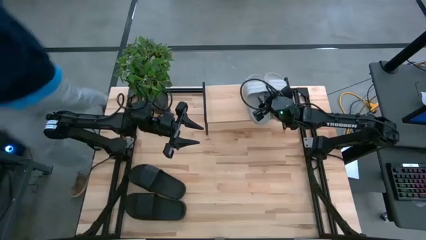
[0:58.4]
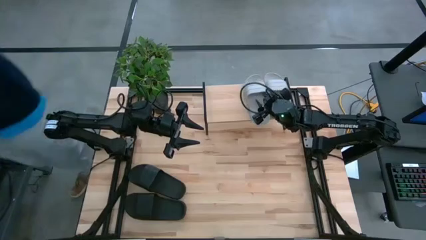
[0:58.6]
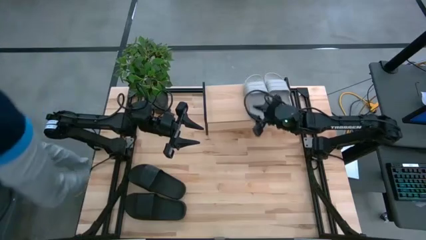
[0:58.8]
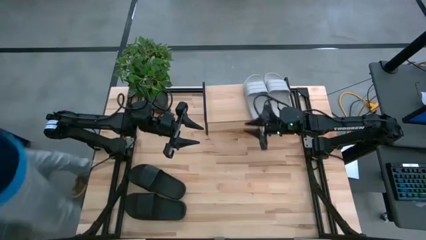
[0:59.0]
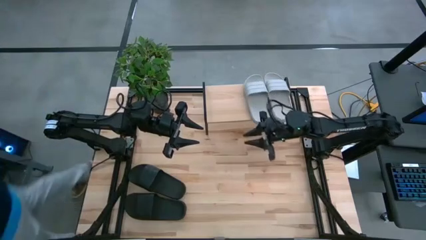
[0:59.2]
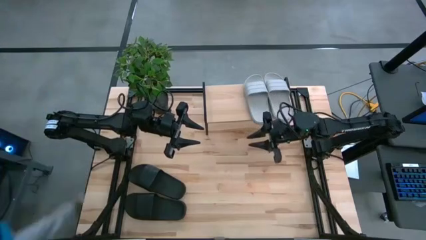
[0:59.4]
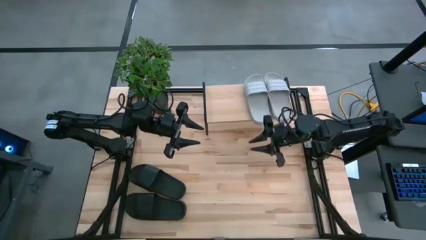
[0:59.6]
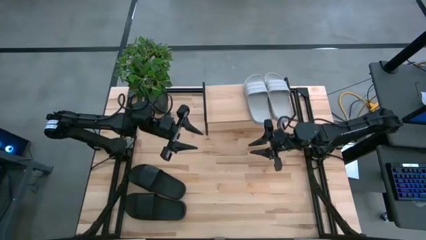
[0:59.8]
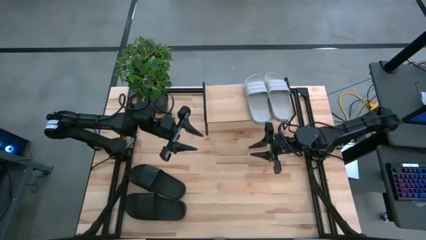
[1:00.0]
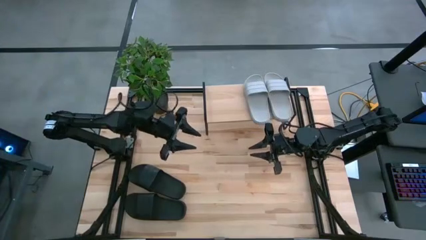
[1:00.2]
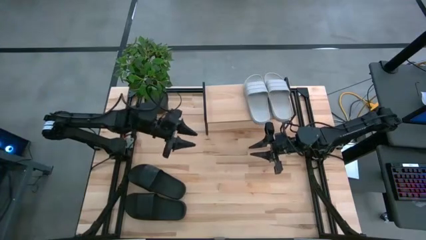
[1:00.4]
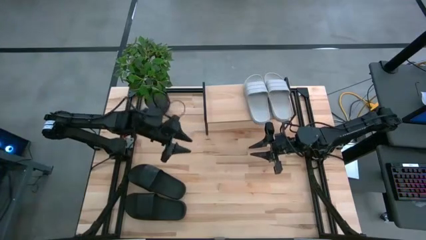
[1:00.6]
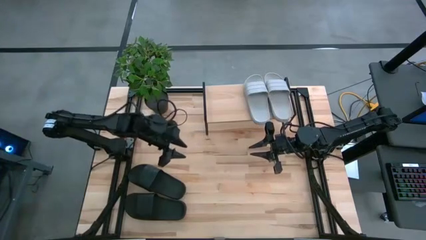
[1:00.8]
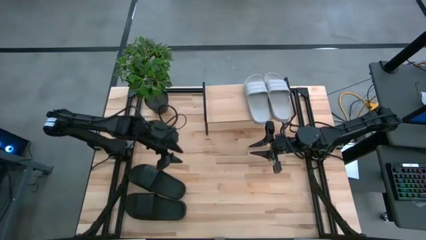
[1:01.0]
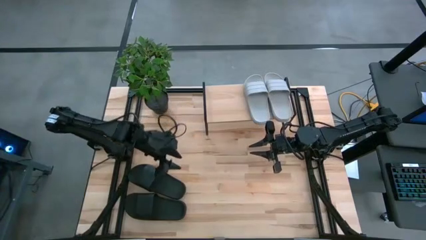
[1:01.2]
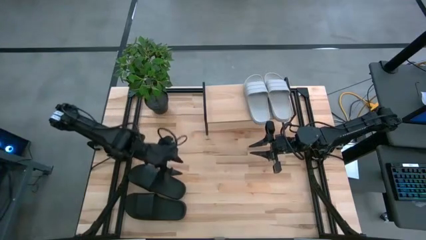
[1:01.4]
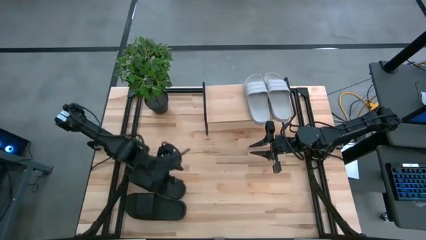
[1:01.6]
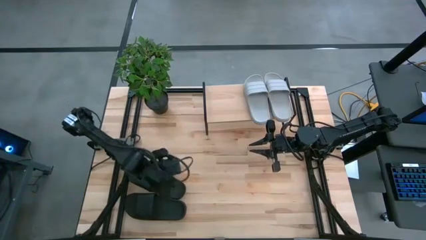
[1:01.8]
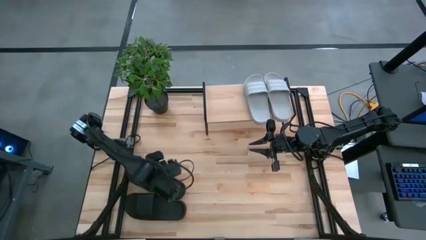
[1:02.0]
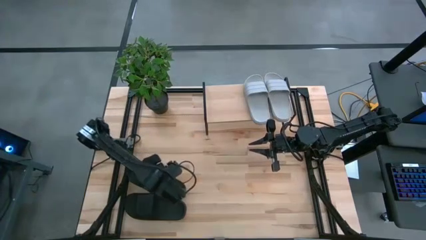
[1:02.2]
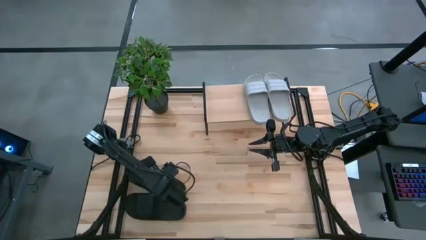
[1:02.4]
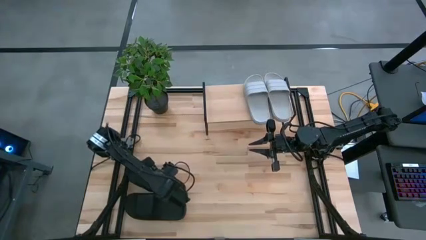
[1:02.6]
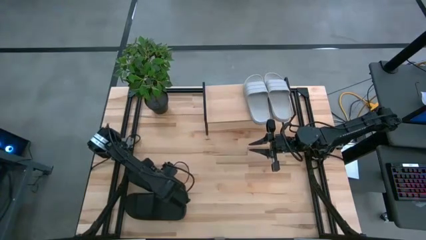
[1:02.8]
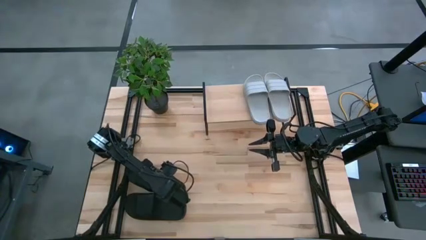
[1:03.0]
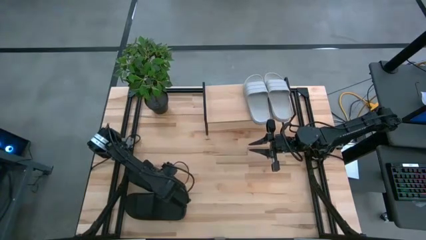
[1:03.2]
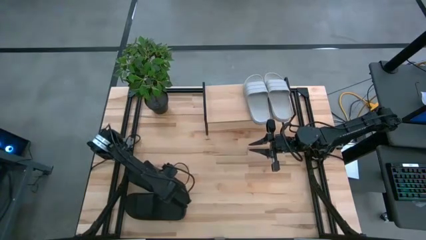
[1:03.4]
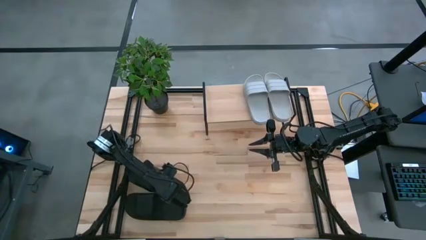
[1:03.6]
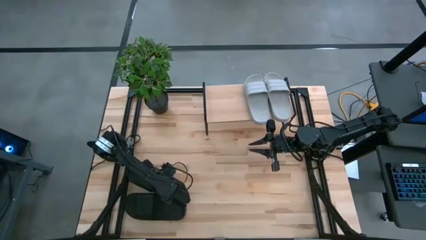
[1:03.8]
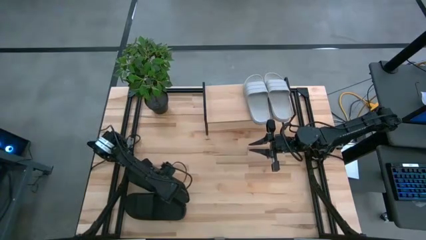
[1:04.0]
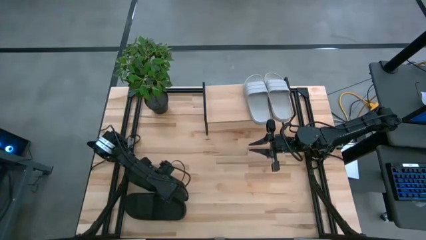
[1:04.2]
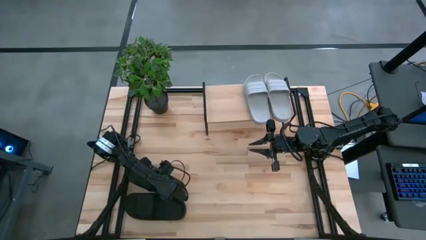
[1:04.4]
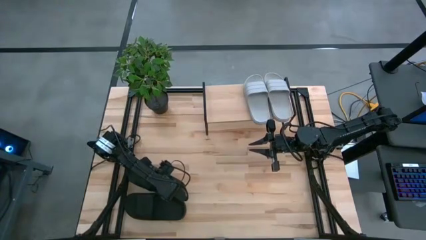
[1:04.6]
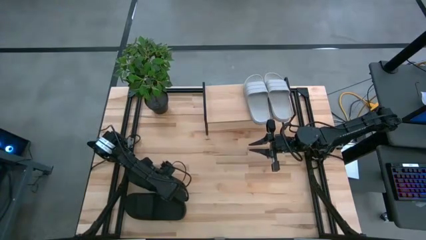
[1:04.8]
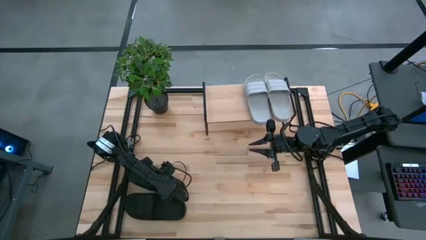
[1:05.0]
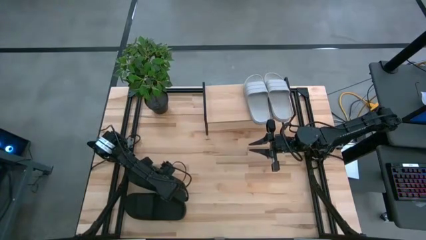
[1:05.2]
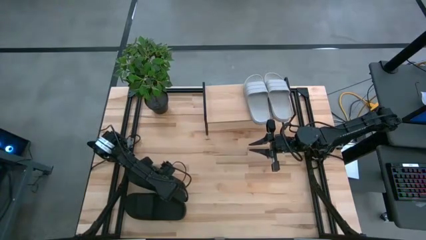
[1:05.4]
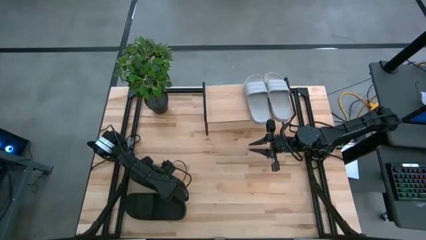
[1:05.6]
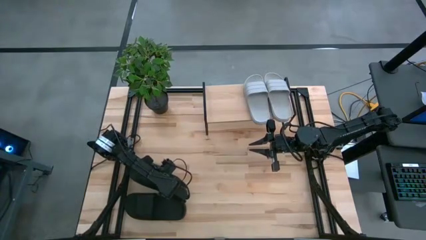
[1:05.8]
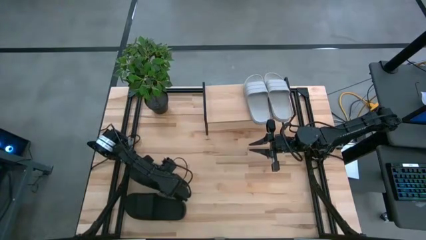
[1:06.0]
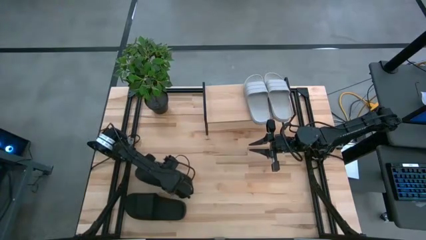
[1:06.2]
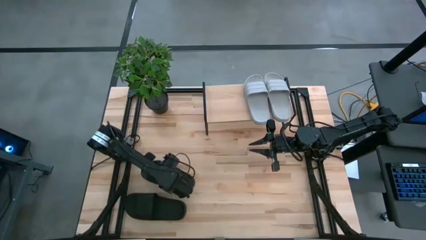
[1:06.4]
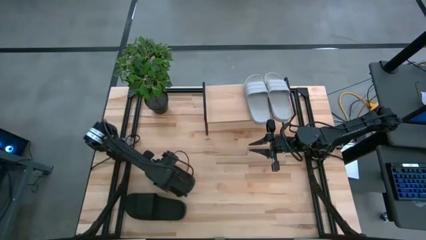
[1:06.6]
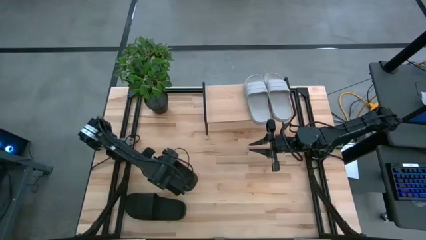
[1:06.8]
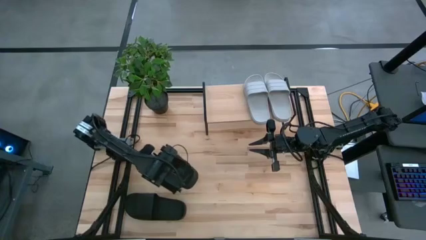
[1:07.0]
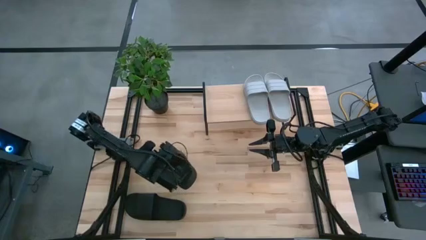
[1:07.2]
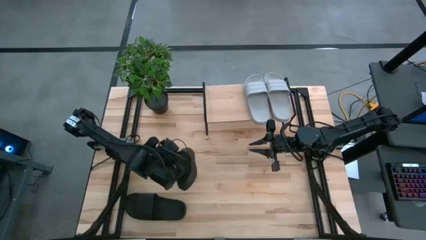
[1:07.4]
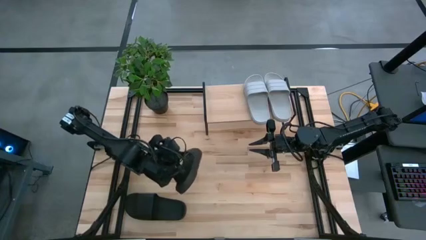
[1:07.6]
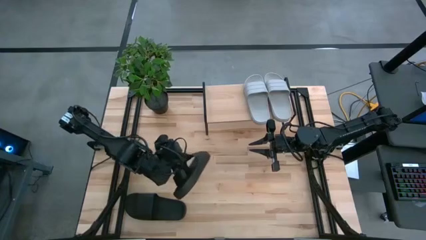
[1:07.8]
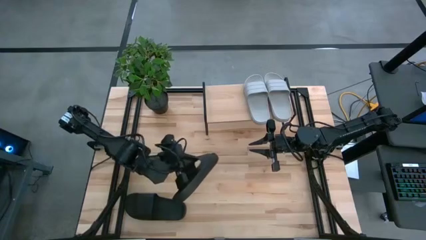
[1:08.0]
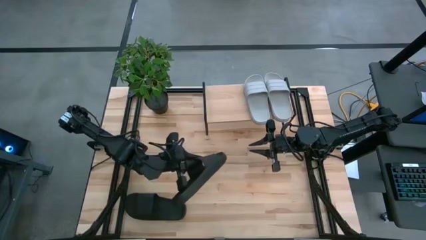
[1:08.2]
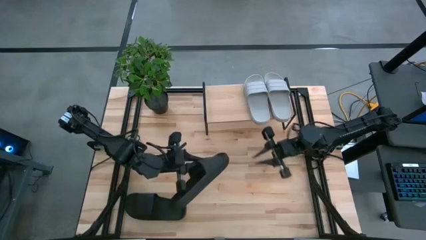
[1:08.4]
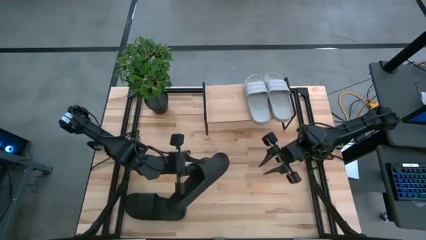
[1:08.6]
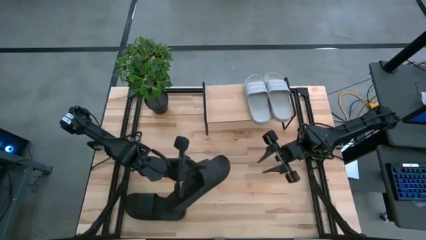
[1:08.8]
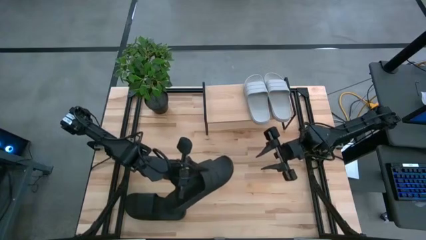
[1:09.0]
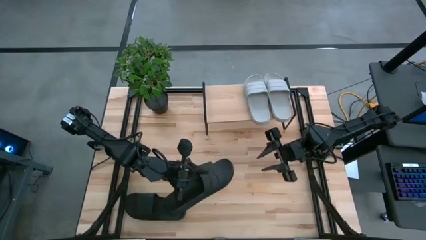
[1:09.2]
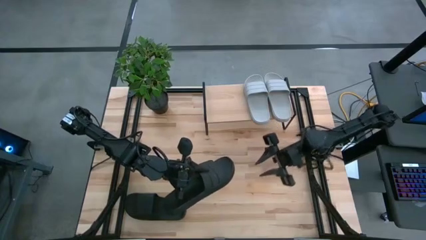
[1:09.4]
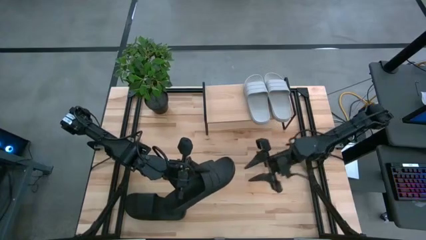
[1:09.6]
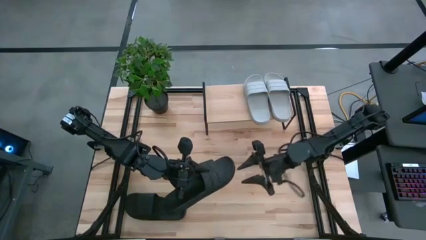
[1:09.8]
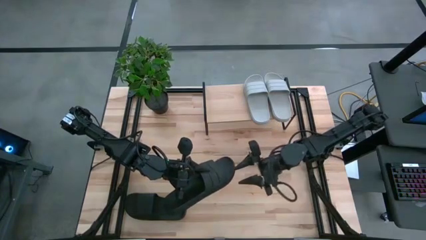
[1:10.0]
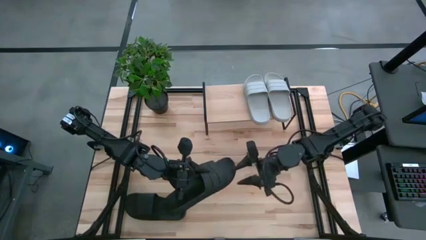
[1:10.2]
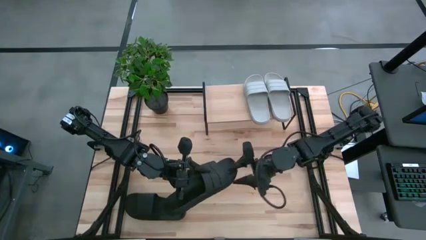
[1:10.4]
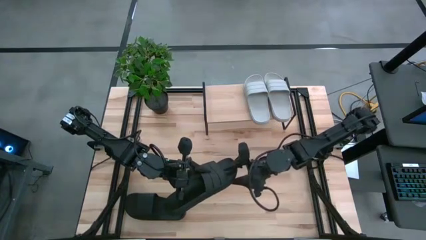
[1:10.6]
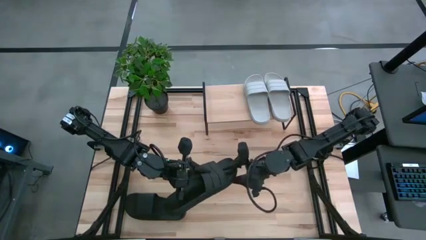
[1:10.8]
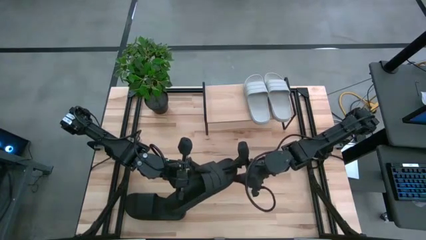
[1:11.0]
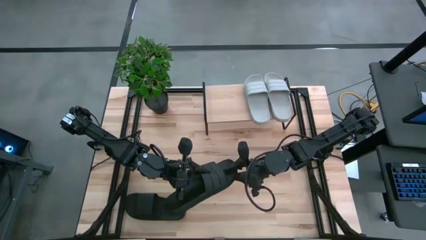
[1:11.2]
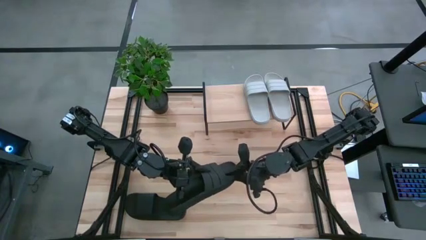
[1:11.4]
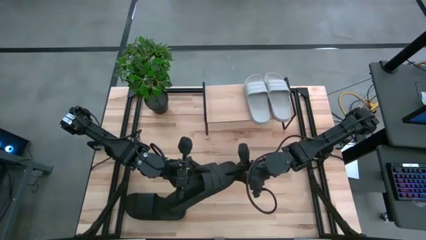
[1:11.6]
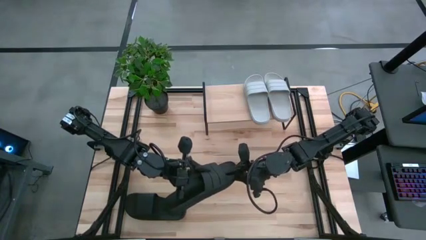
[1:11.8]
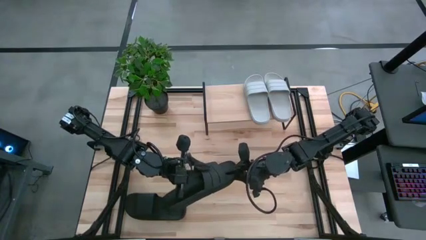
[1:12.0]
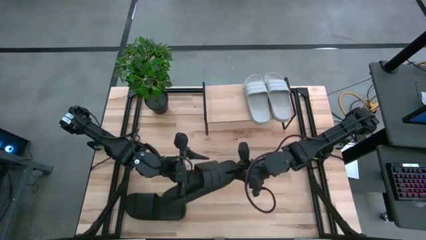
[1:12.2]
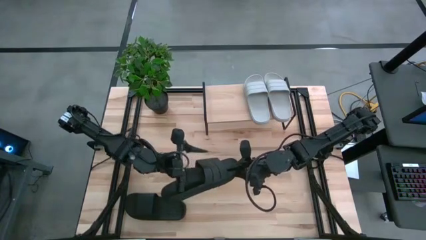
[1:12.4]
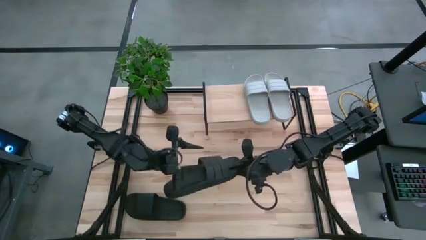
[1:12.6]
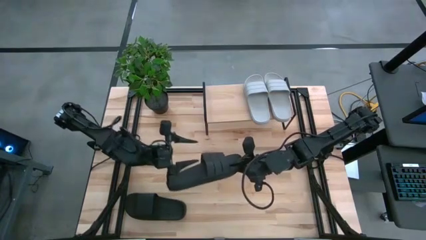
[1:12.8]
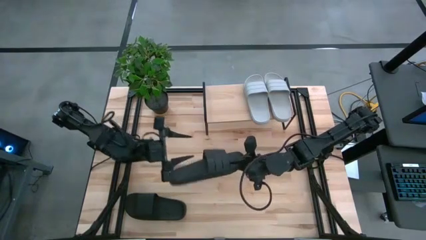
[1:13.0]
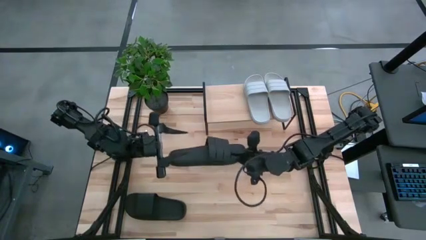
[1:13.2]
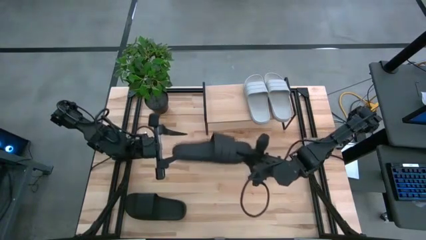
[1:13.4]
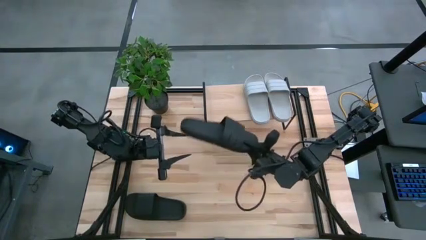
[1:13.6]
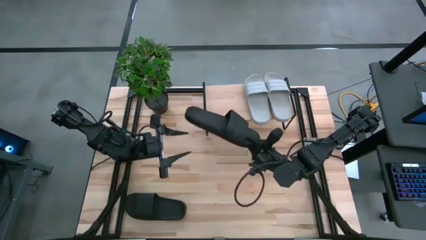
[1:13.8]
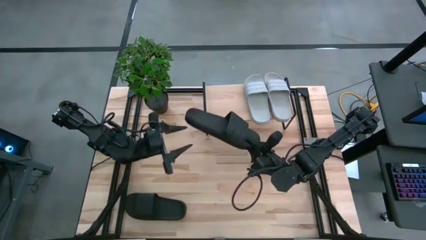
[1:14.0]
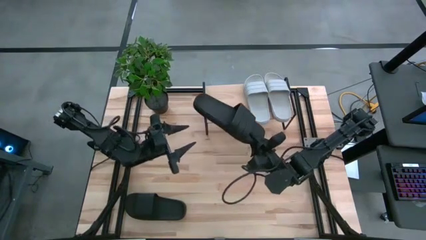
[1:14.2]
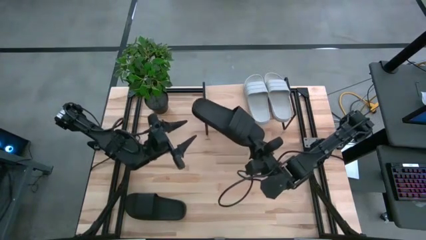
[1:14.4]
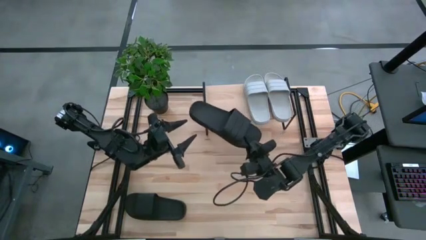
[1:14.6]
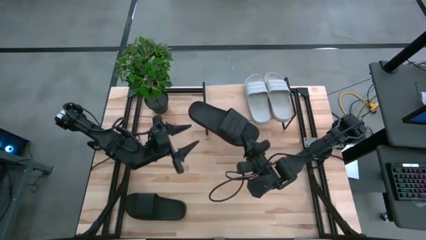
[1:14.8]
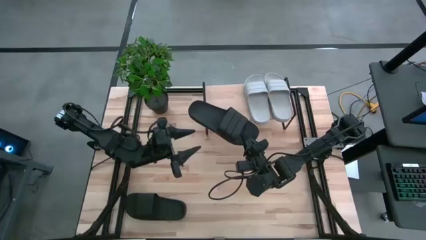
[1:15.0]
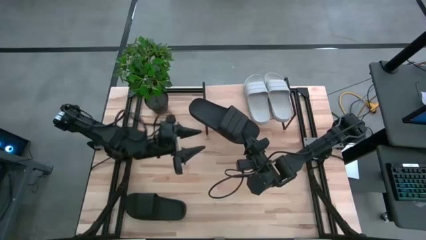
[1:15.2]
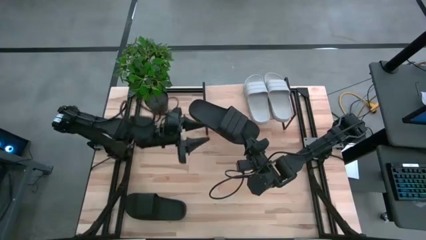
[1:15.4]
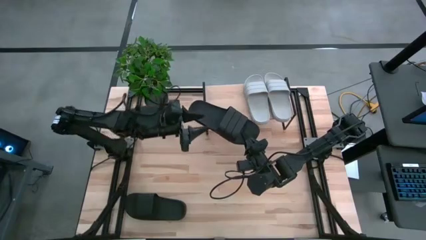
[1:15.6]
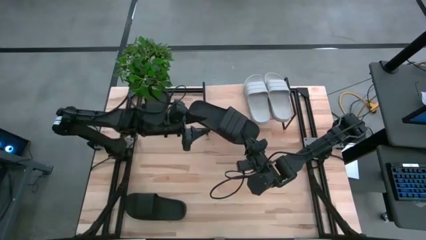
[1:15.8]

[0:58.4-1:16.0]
Task: Pick and place slides into the shelf
Put the top black slide on the shelf
